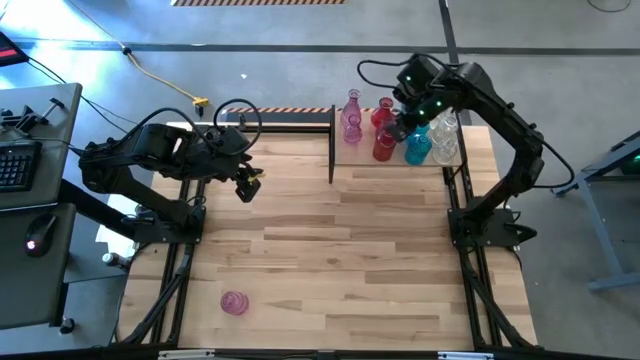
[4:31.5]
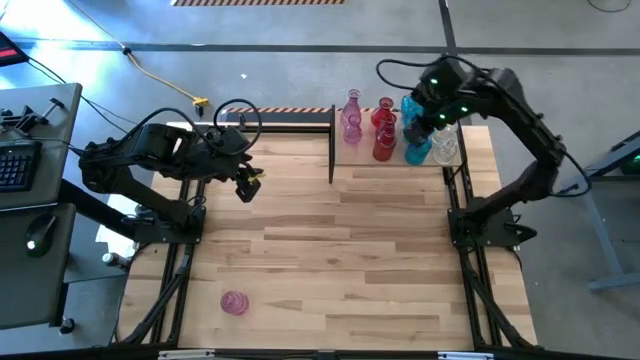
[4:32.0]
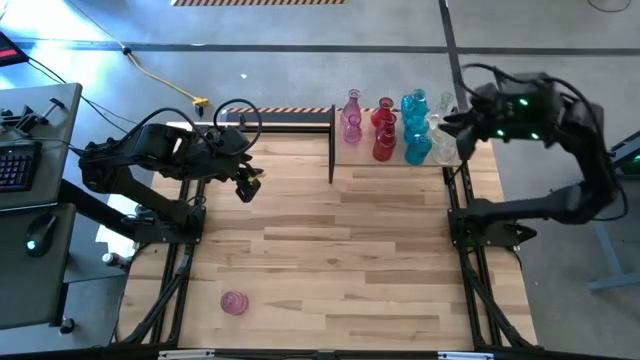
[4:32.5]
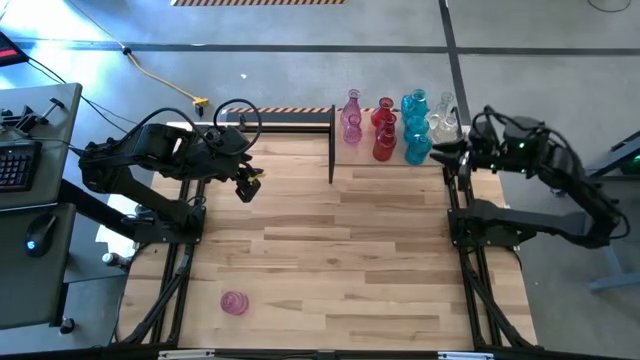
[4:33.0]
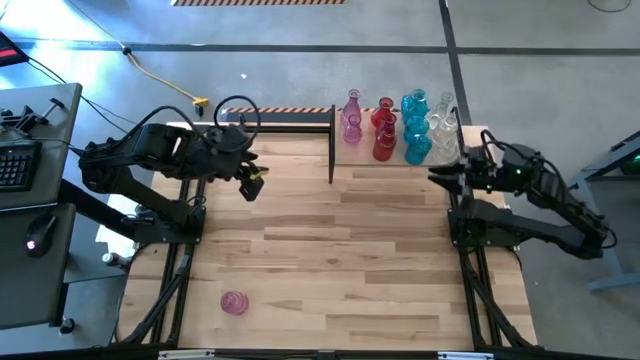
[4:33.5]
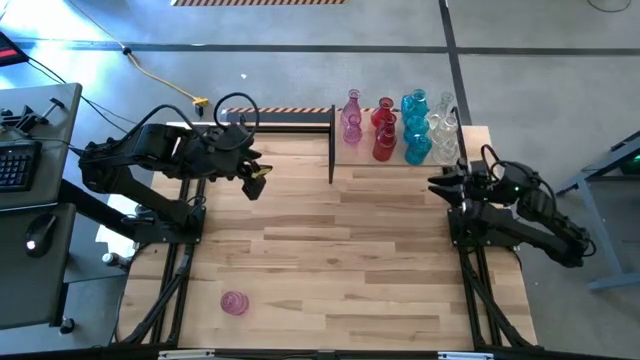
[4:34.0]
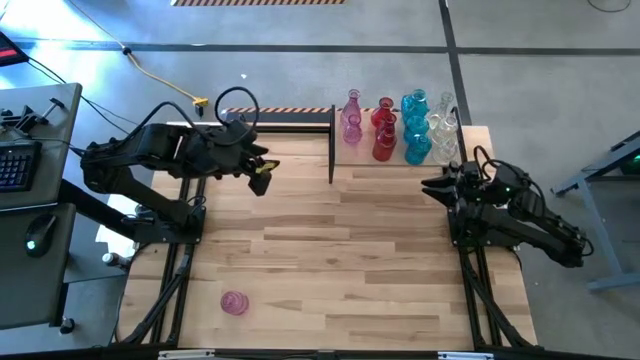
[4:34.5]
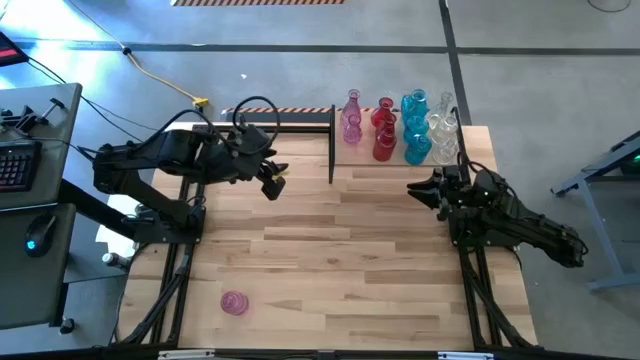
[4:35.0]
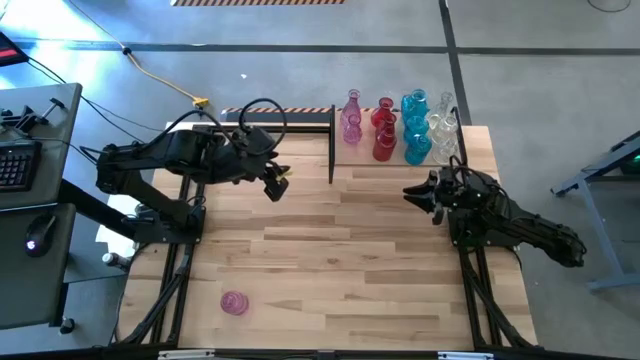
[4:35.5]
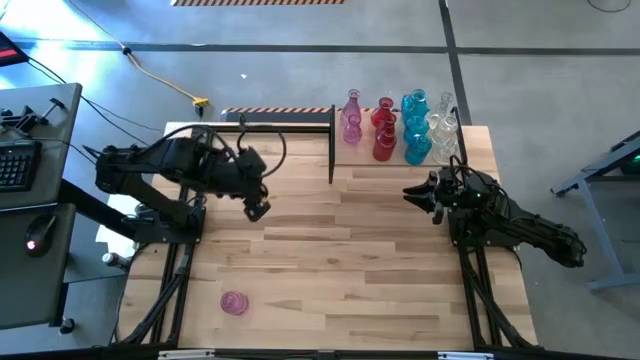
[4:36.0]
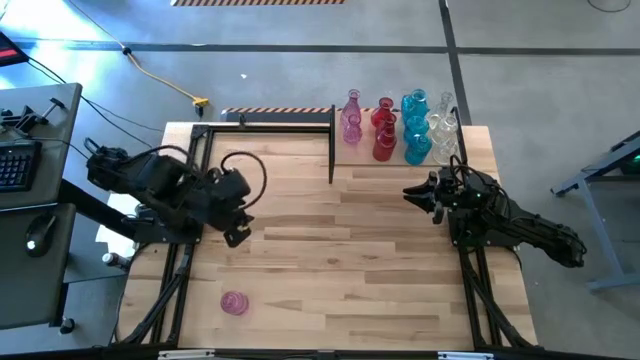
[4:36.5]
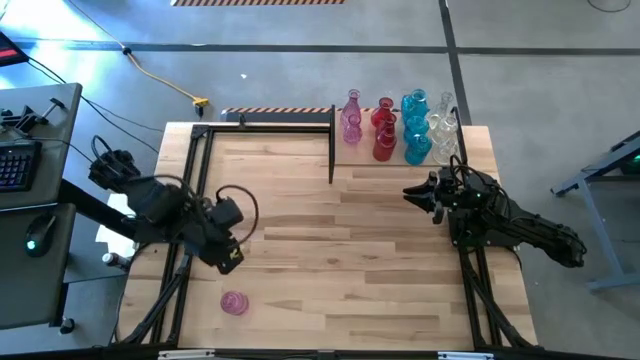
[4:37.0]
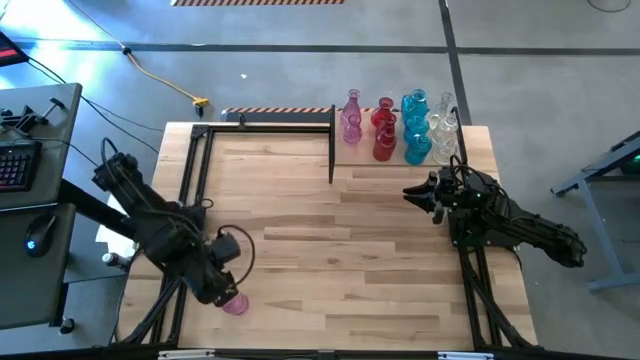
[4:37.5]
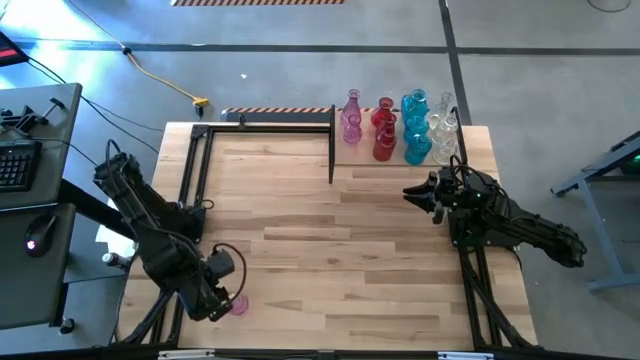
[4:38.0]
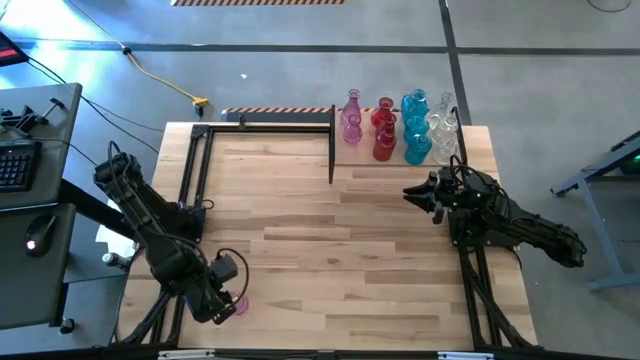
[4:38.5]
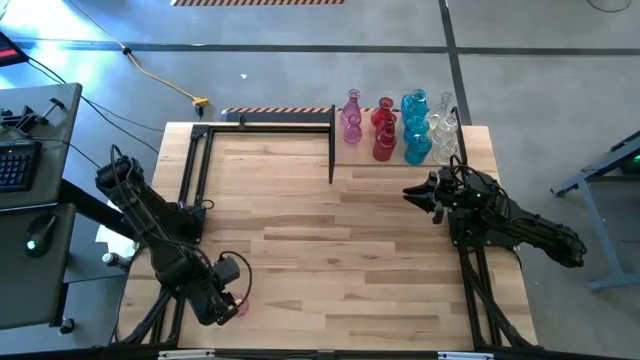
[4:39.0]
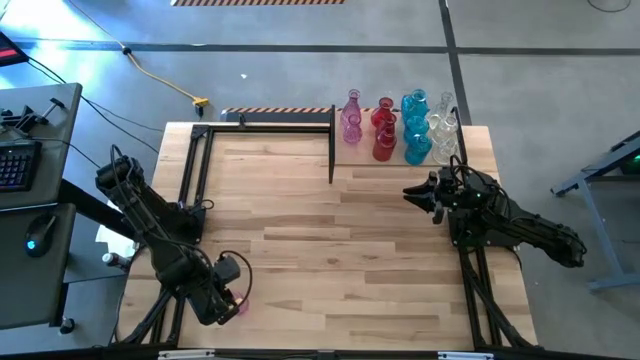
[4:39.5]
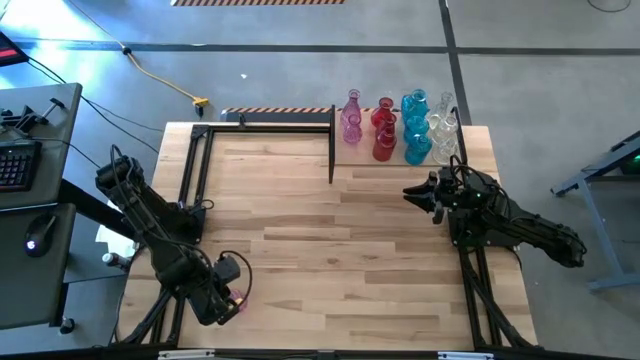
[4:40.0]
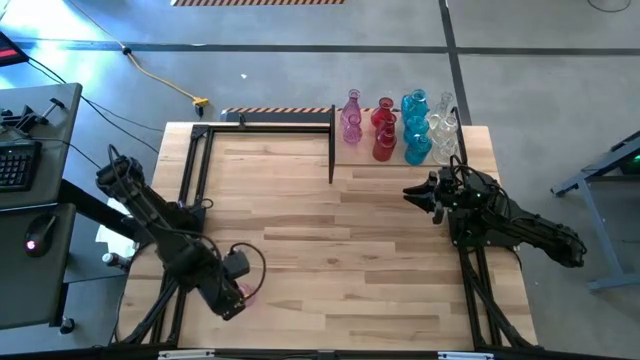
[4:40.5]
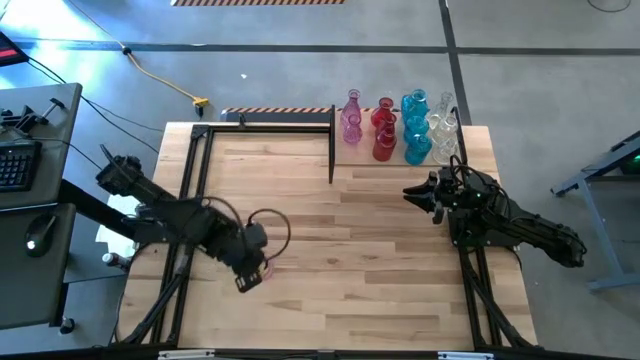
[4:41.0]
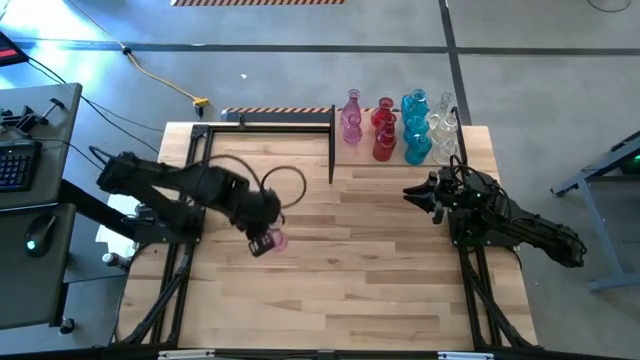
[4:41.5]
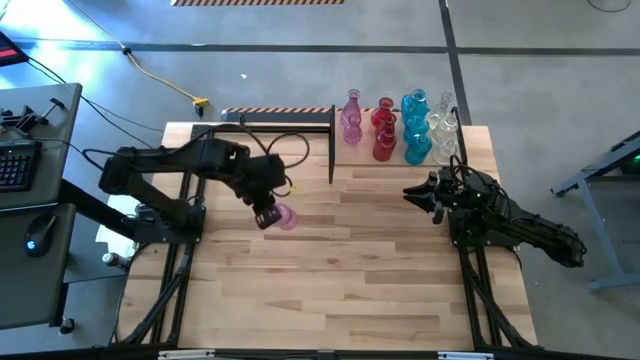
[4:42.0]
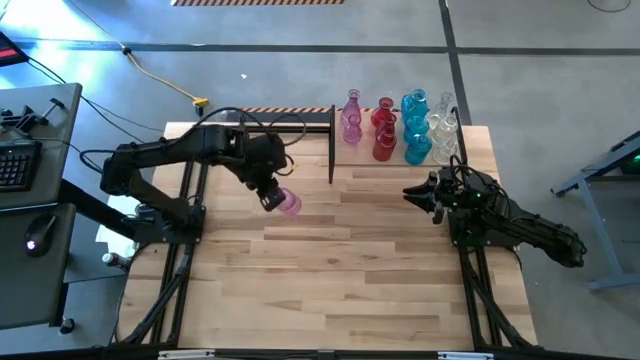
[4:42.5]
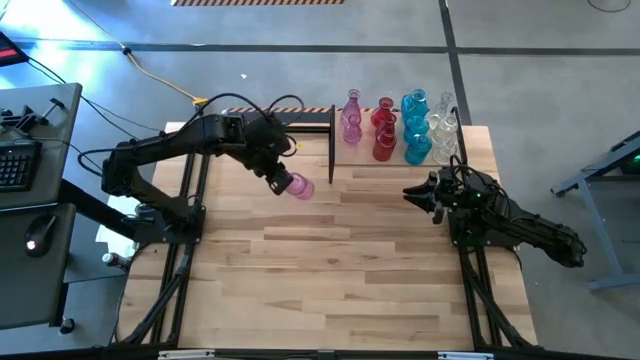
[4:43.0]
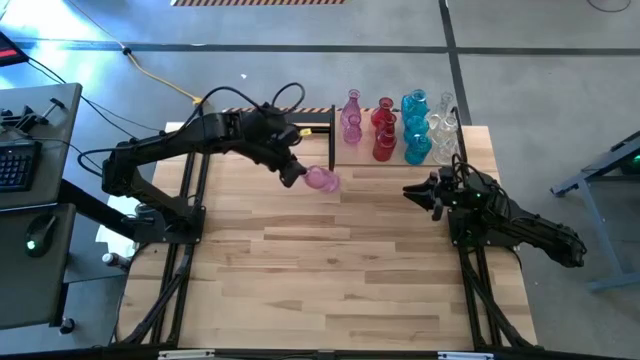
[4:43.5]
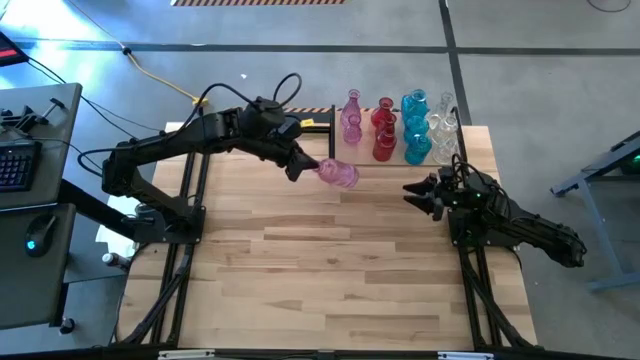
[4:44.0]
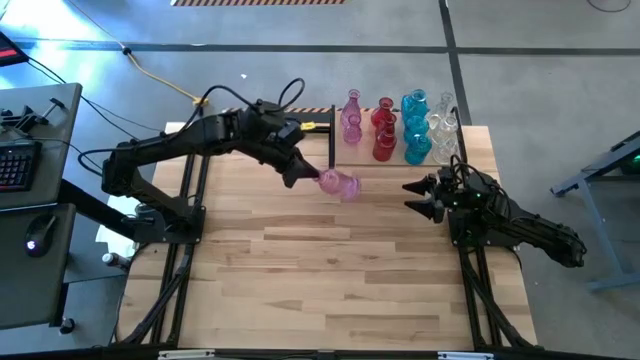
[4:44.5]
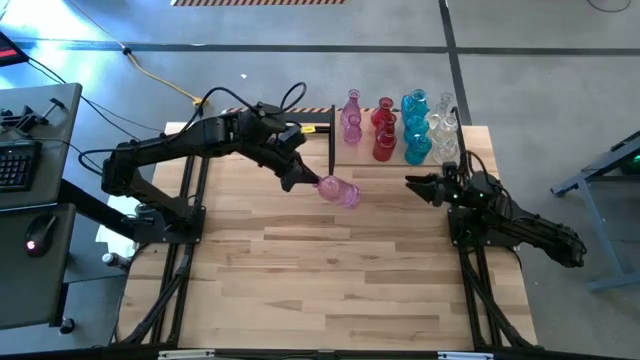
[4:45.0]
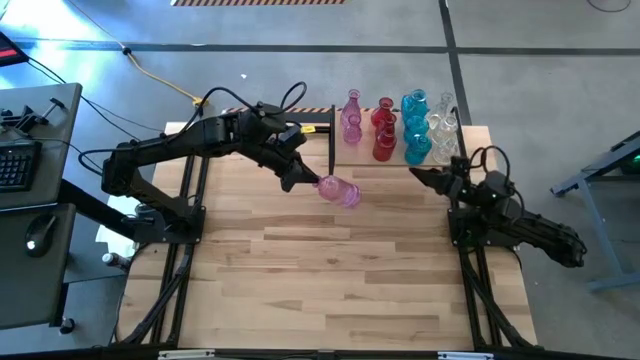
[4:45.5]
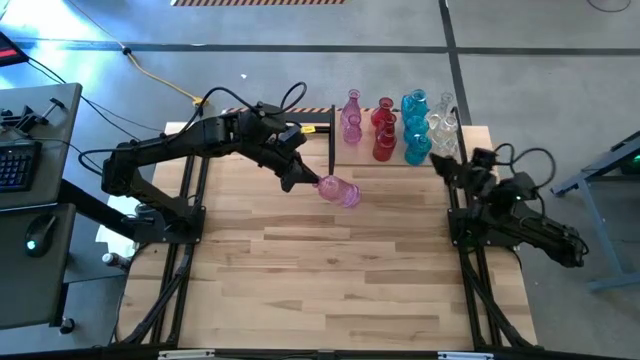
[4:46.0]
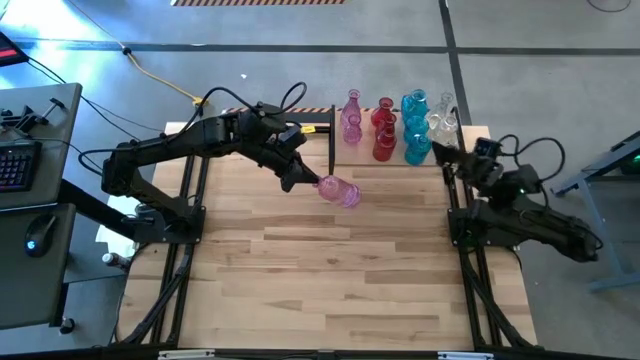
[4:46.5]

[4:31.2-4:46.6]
Task: sort vases onto shelf
Put the pink vase on the shelf aligned with the pink vases

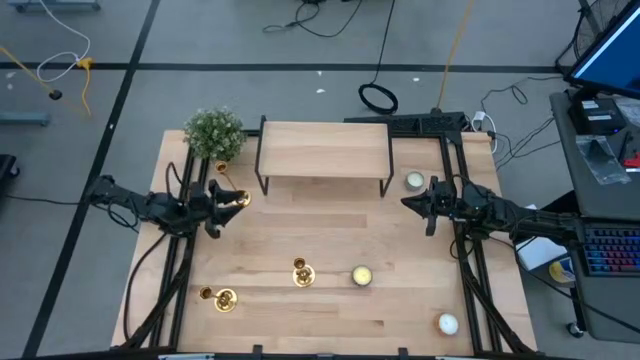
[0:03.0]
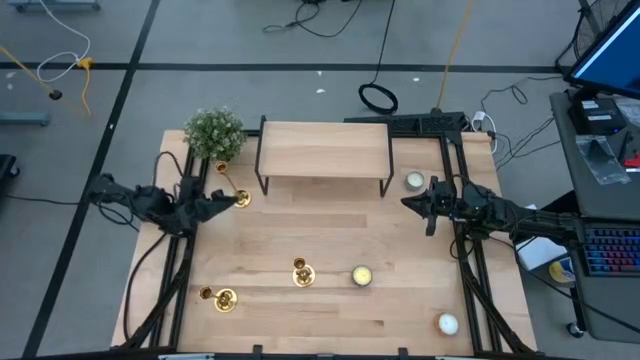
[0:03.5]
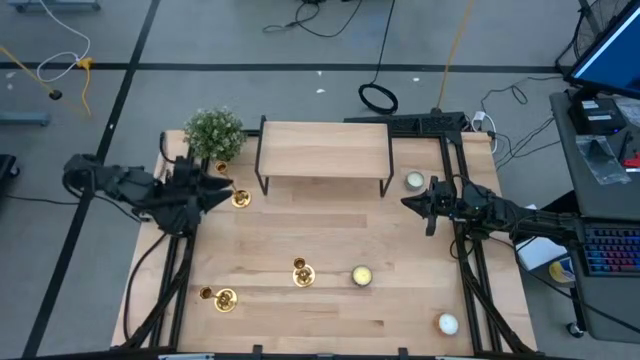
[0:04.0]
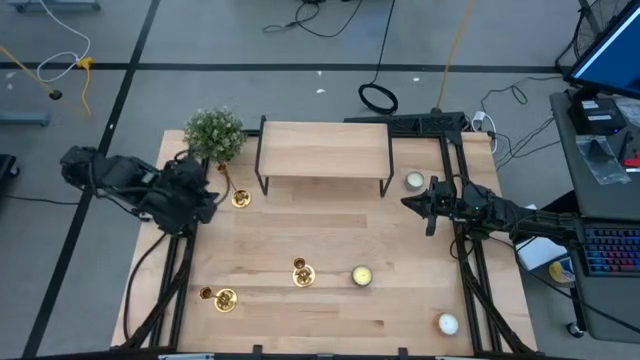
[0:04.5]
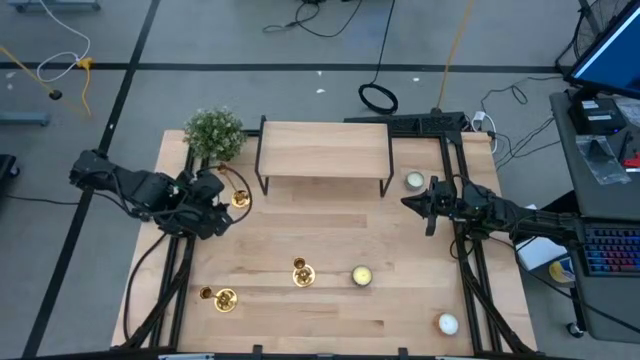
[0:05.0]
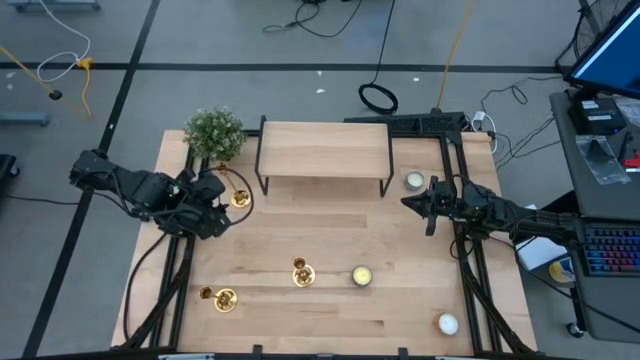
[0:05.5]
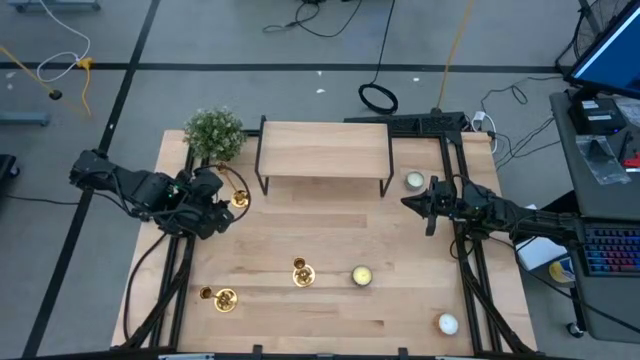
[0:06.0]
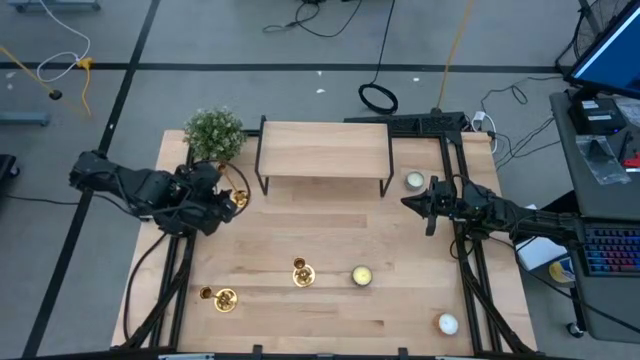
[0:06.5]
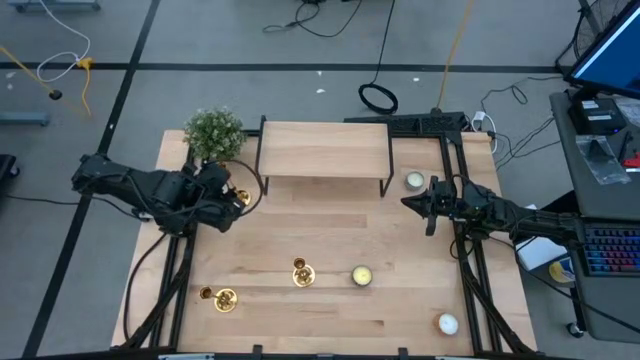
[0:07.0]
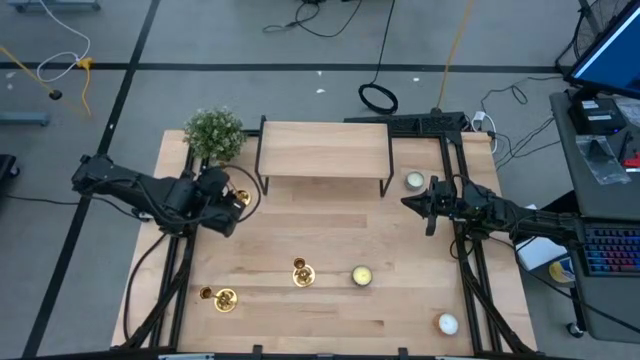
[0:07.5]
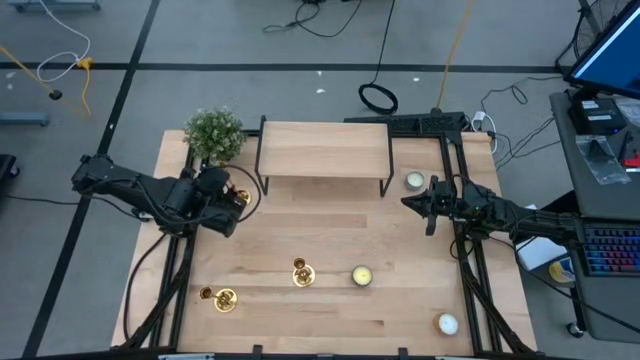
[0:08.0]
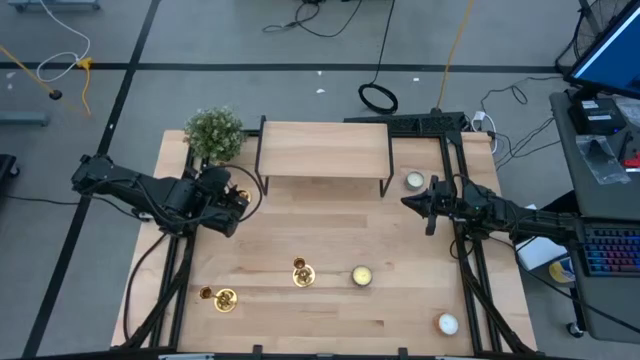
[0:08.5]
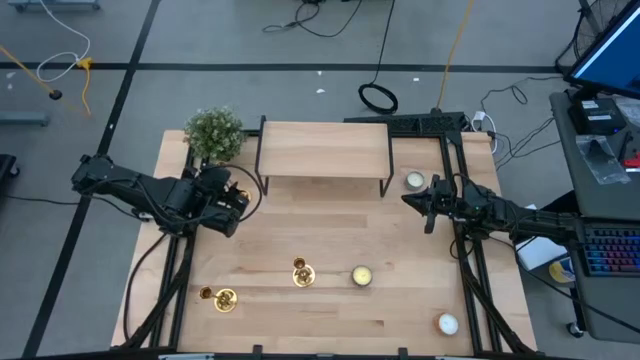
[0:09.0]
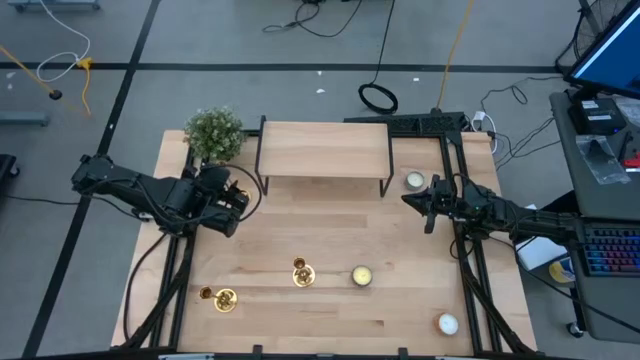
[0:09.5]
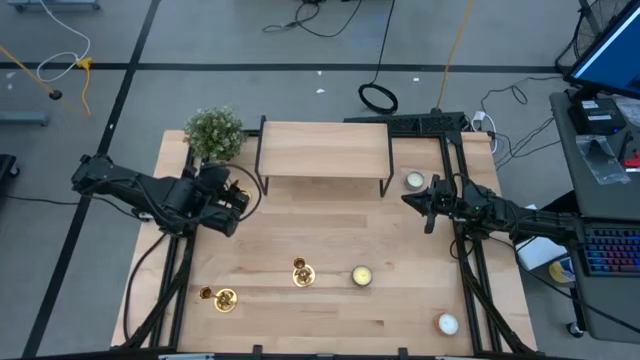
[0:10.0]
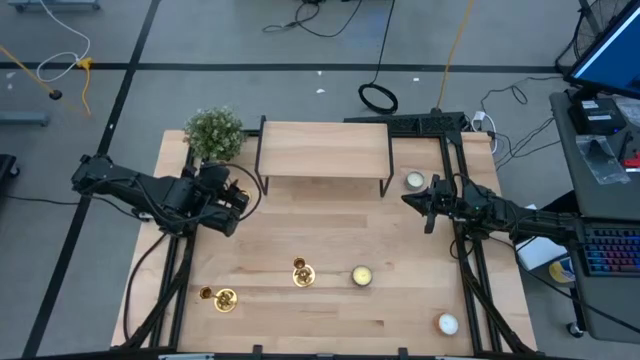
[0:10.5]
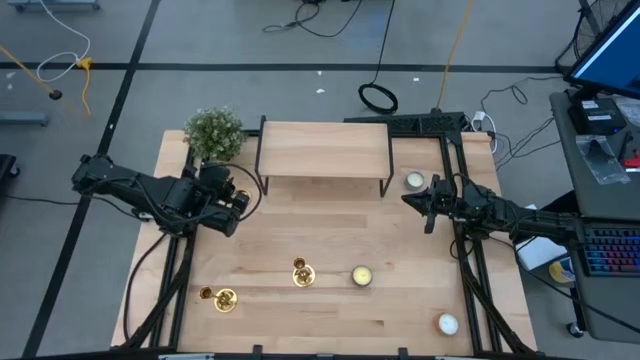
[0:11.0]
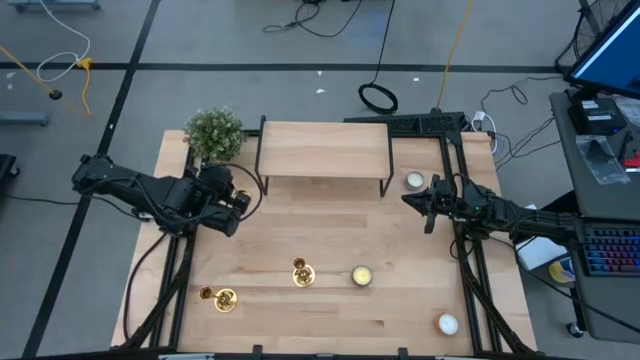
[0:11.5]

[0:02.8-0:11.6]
Task: Pick & Place candle stick holders
Put the top gold candle holder on the shelf
